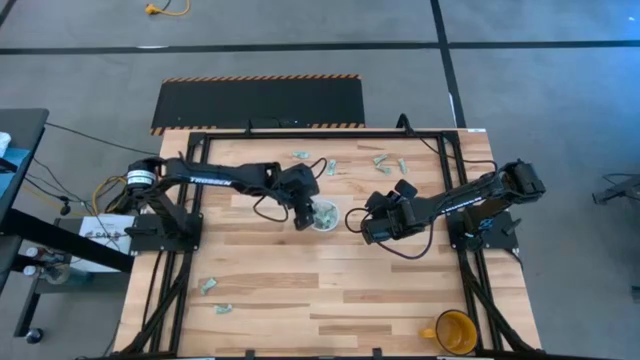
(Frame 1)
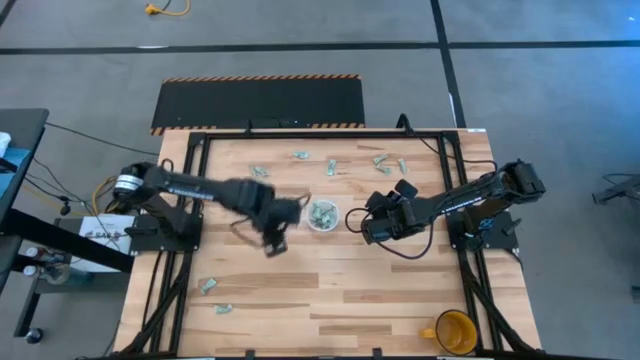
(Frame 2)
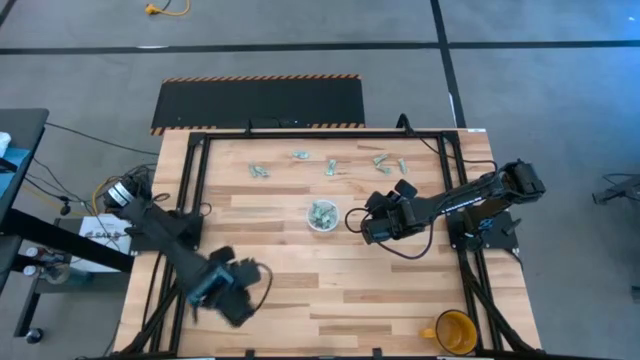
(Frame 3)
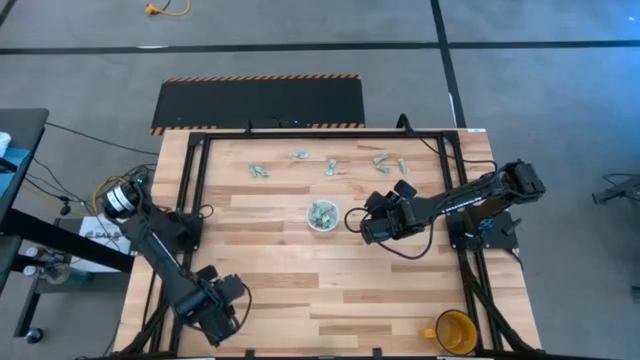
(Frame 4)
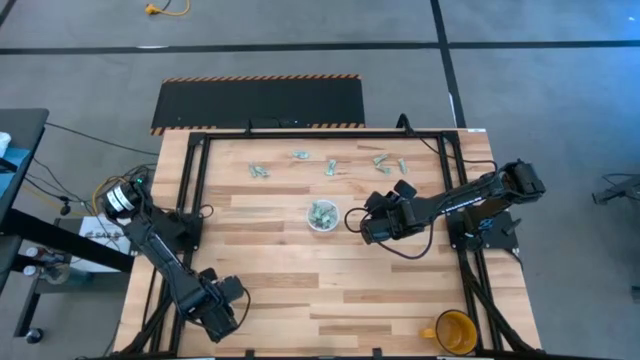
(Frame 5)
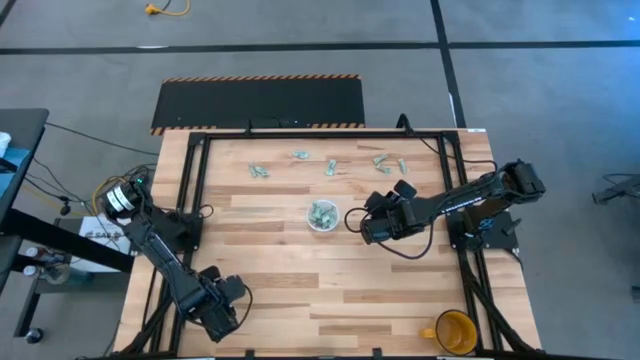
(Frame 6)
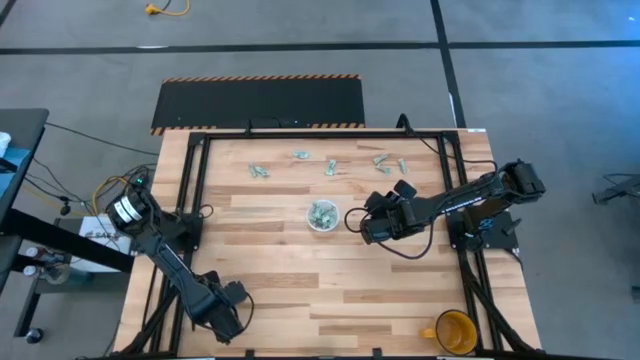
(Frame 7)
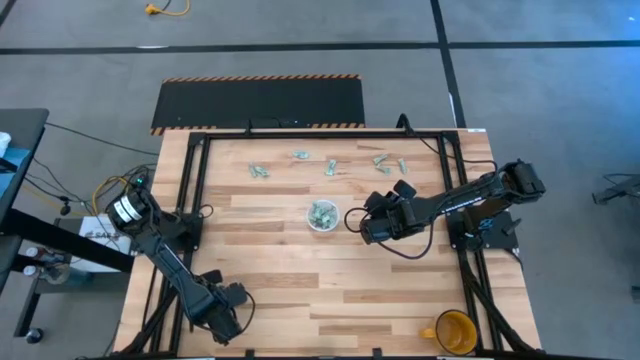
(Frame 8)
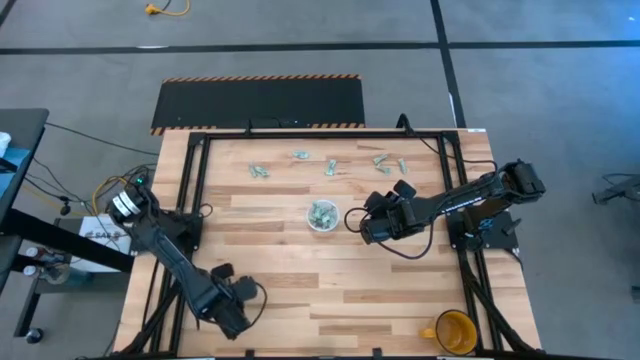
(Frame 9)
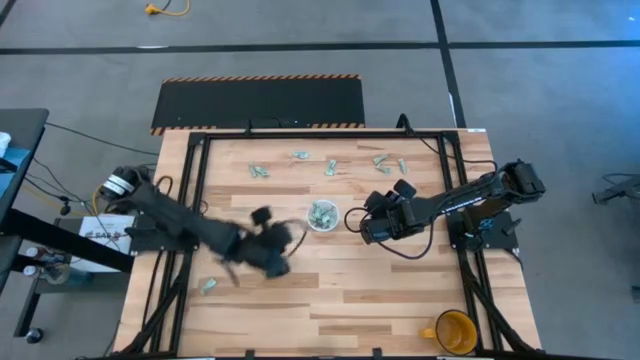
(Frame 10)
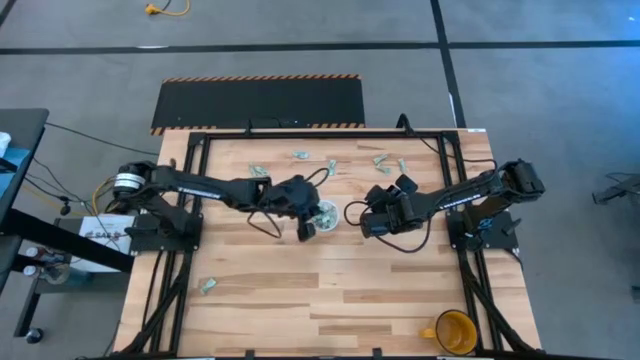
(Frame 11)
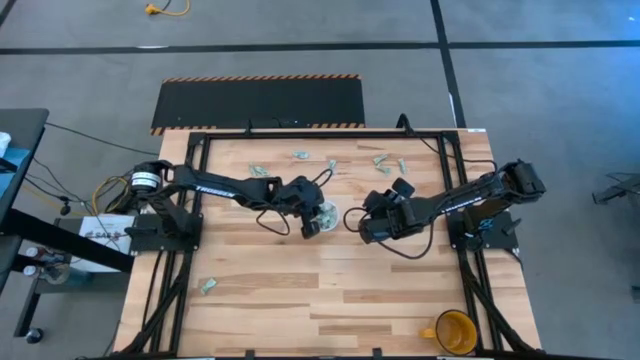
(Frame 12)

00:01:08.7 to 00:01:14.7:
Task: Pick and place Stevia / Truvia into bins
Put the green stevia packet into the transparent container

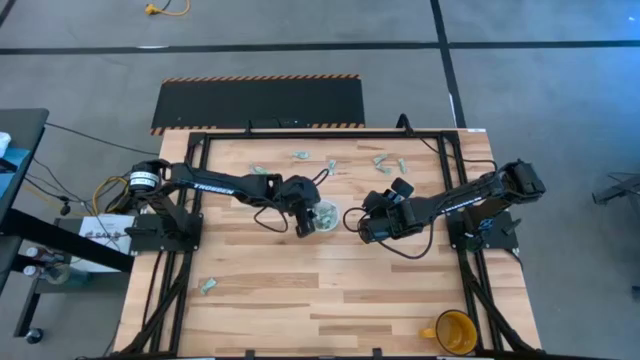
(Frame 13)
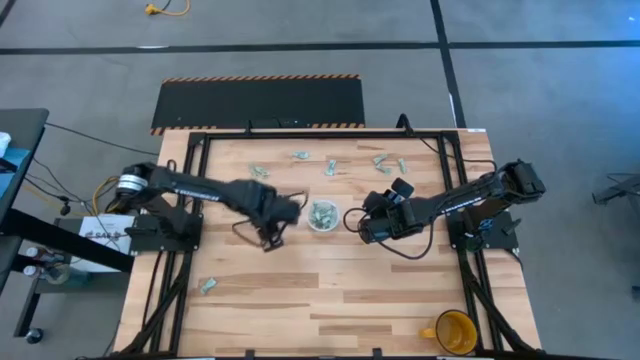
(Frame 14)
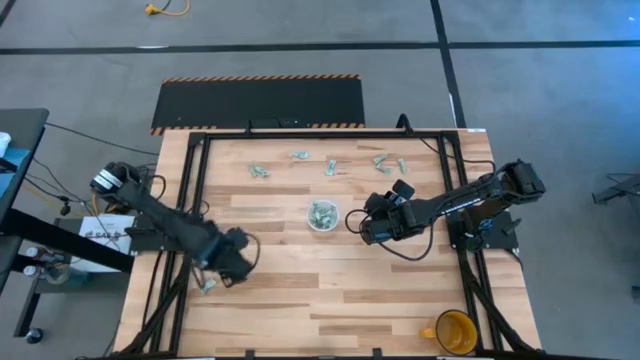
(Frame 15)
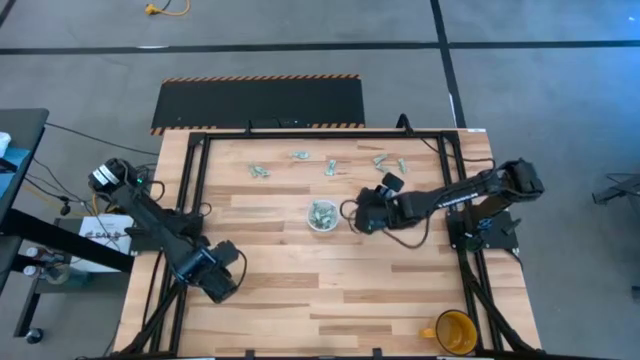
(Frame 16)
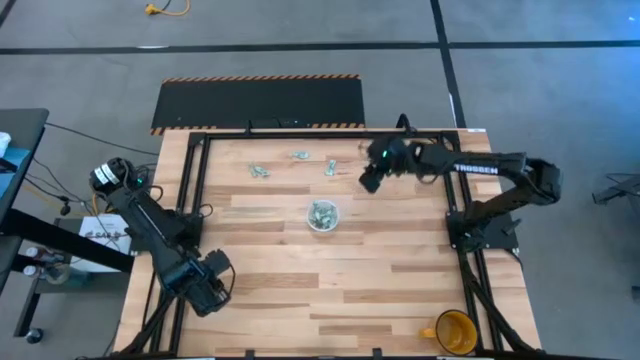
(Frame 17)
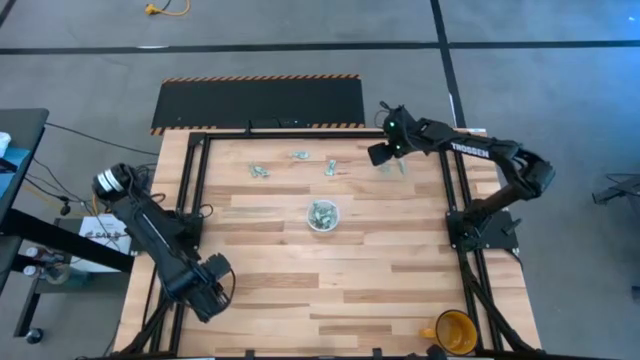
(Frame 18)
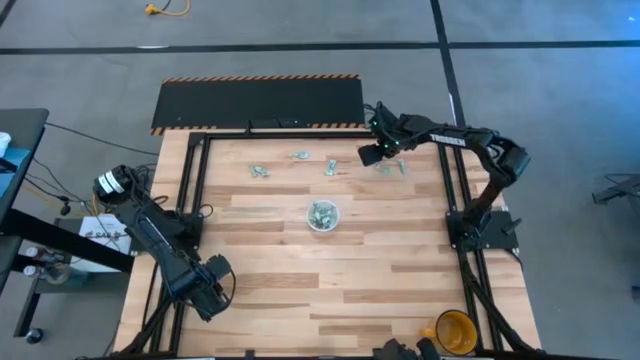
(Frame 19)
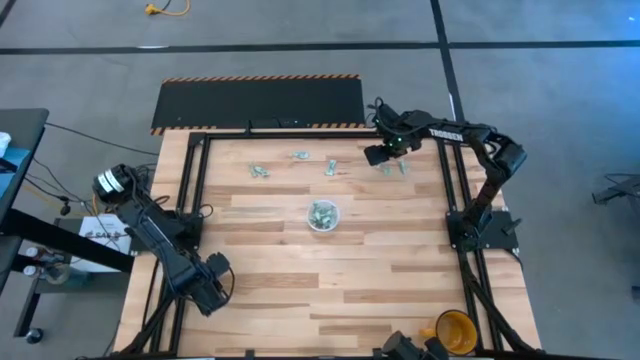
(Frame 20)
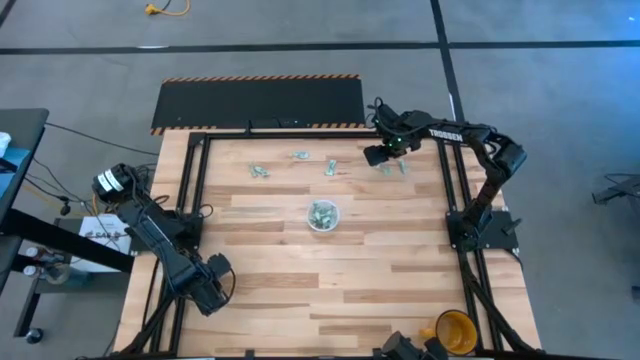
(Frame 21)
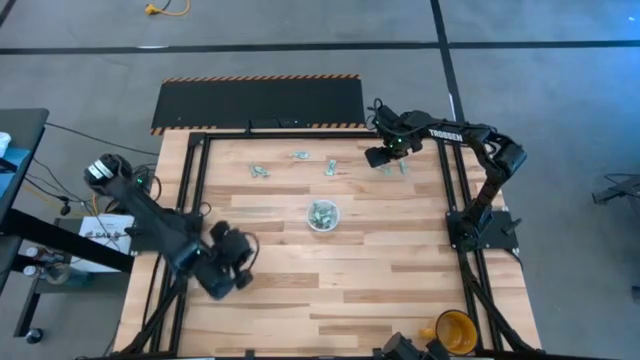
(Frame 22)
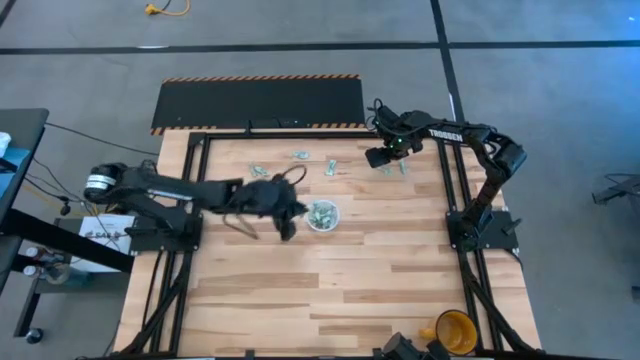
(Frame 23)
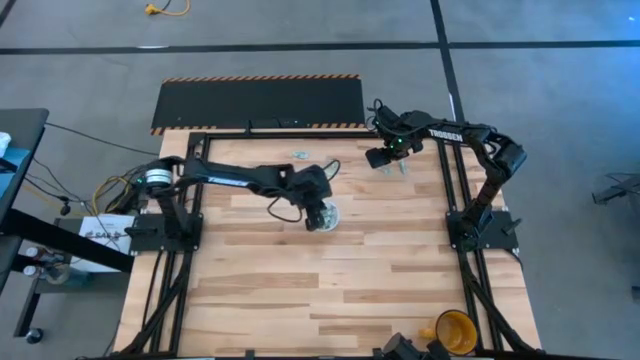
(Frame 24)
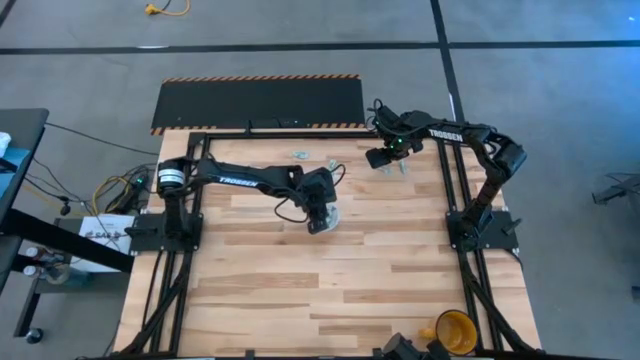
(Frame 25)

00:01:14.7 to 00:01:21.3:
Put the green stevia packet into the transparent container

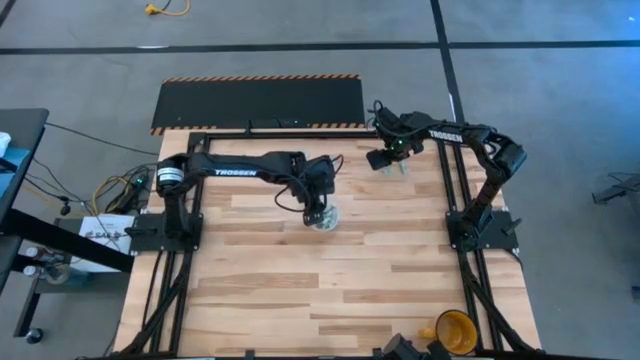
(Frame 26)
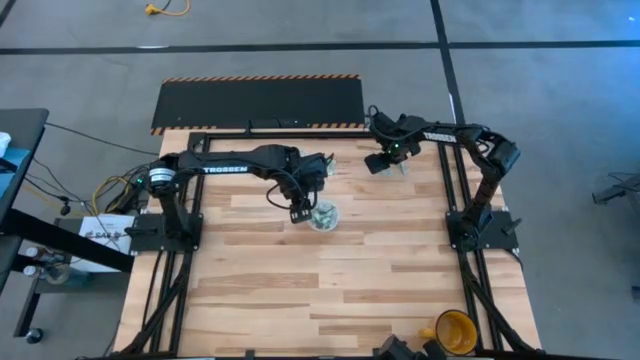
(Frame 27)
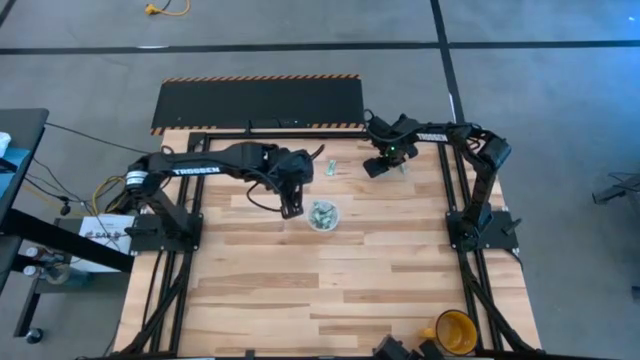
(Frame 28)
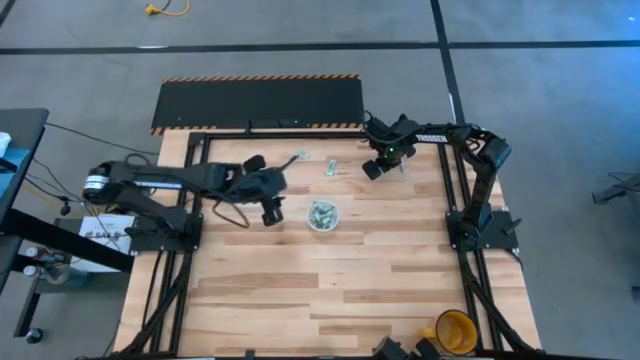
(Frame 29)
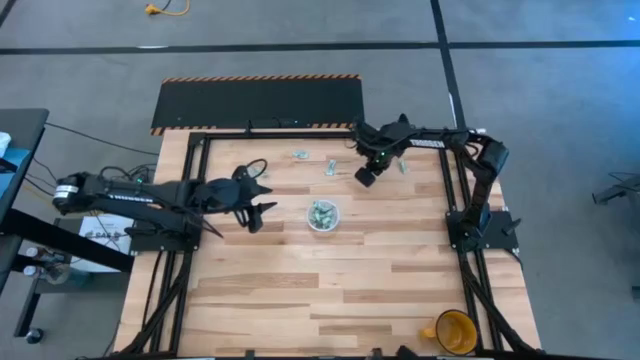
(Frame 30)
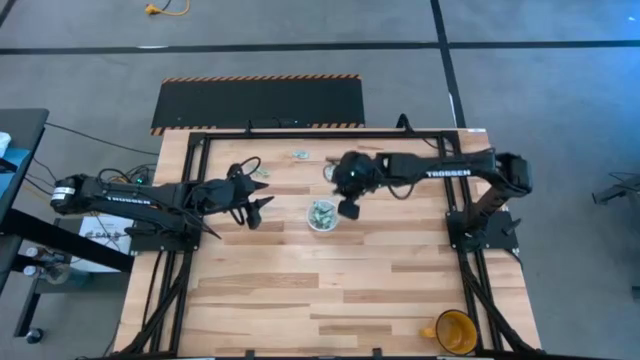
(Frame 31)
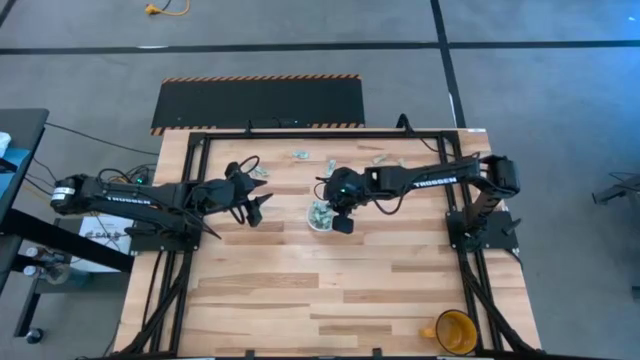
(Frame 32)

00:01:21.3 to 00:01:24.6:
Put the green stevia packet into the transparent container

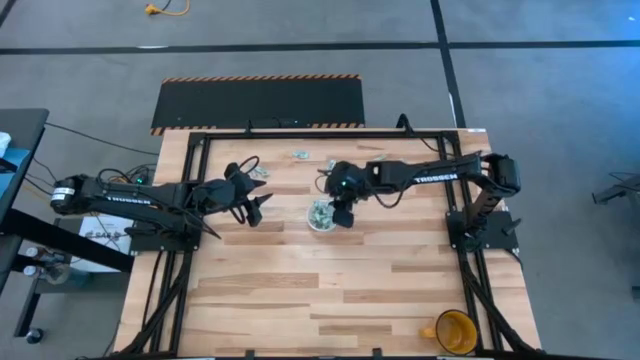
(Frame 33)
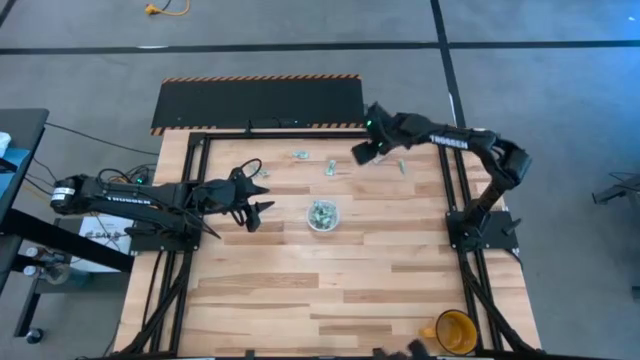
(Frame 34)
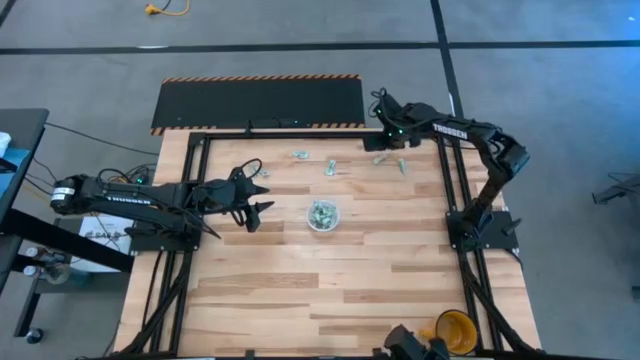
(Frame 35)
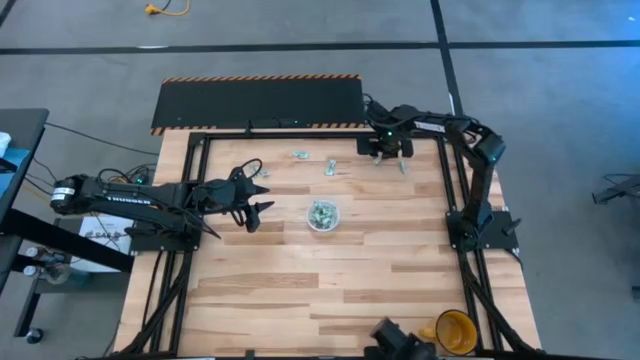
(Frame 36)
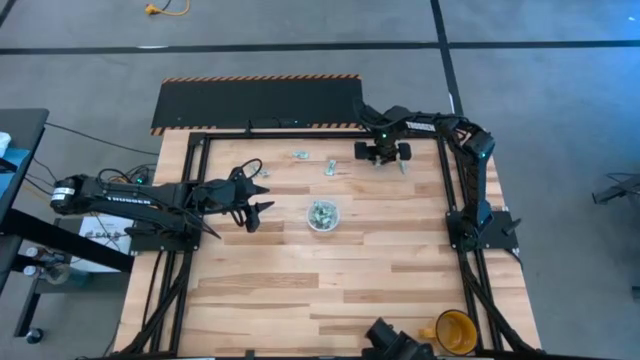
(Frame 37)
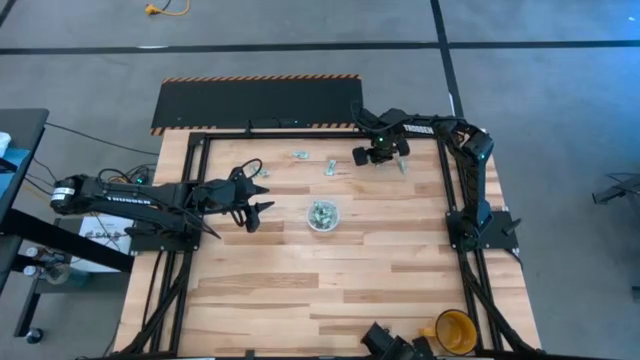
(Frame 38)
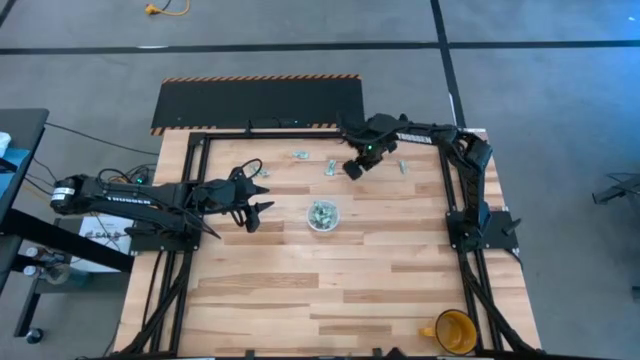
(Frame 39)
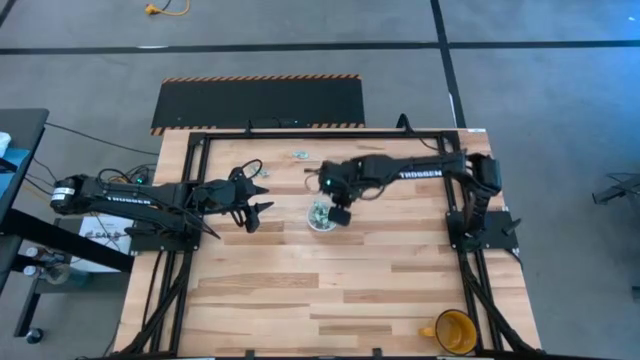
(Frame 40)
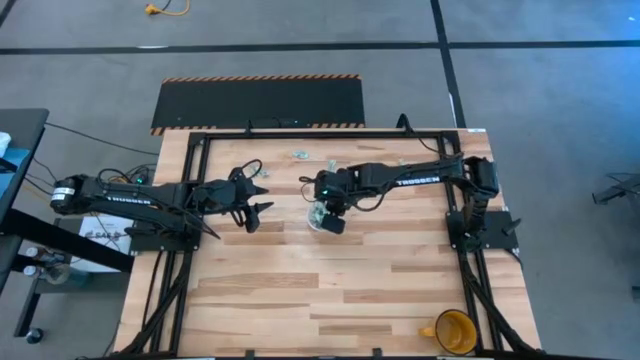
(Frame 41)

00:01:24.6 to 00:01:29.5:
Put the green stevia packet into the transparent container

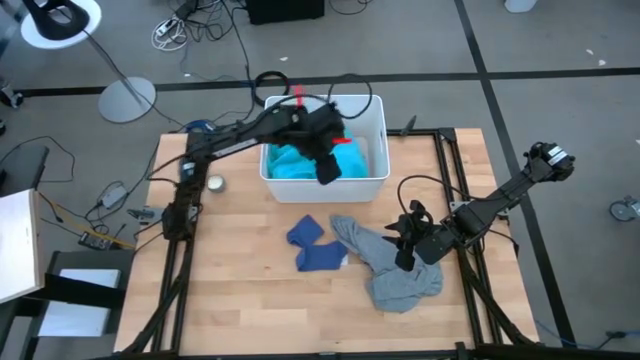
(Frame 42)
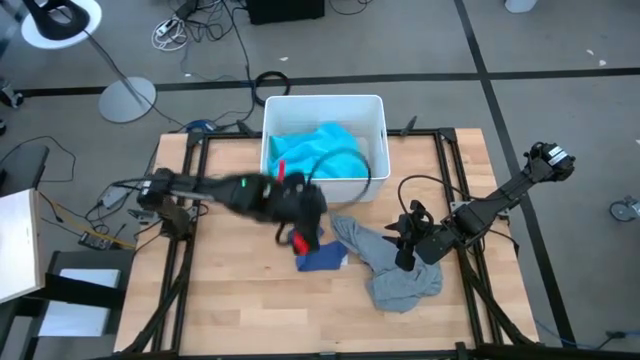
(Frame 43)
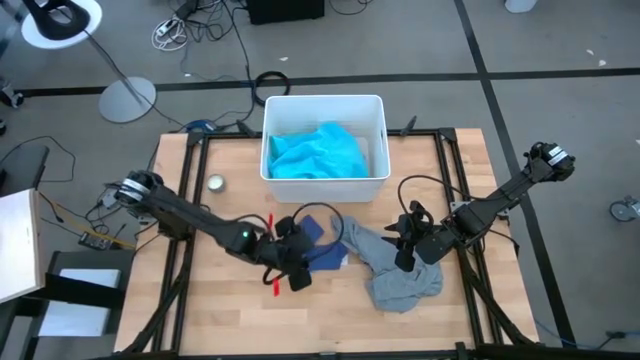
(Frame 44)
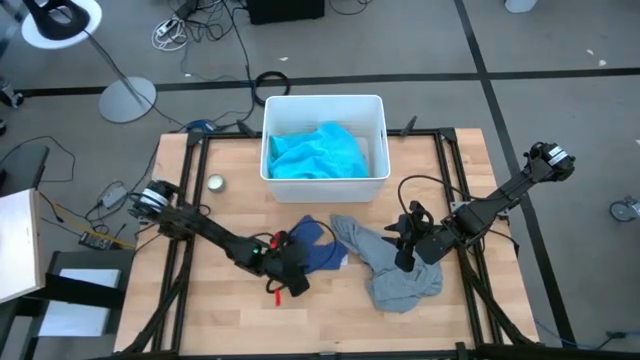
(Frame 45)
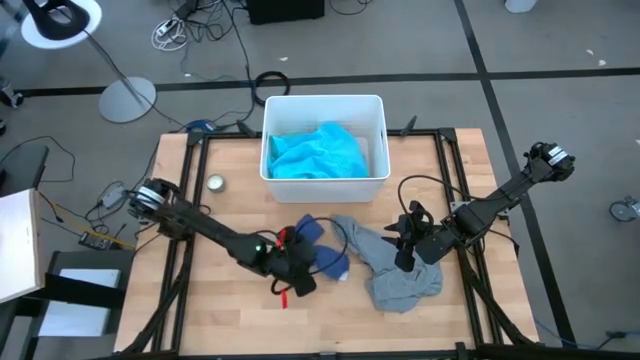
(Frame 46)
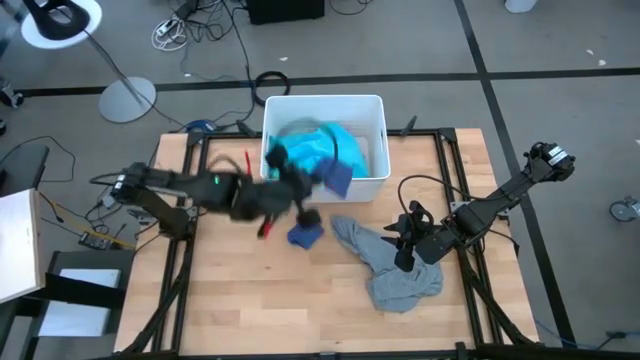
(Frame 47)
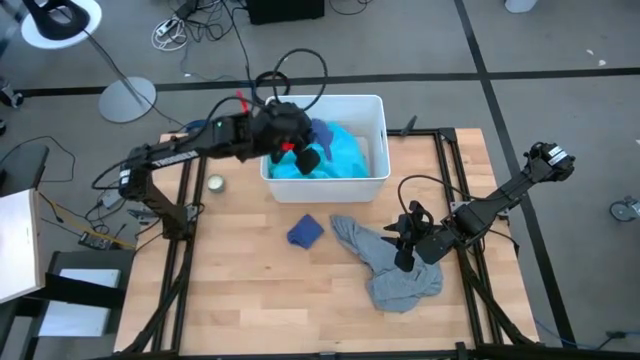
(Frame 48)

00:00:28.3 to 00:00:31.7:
Task: Sort clothes
Put the blue sock into the laundry bin
